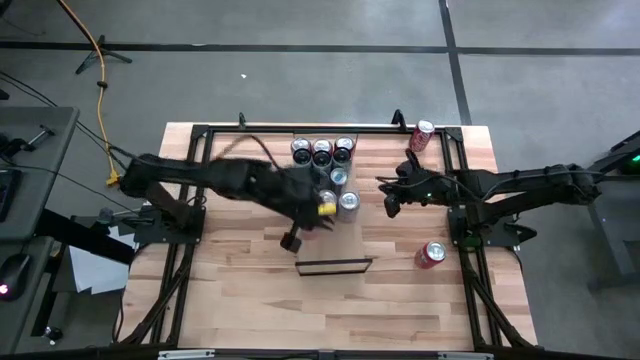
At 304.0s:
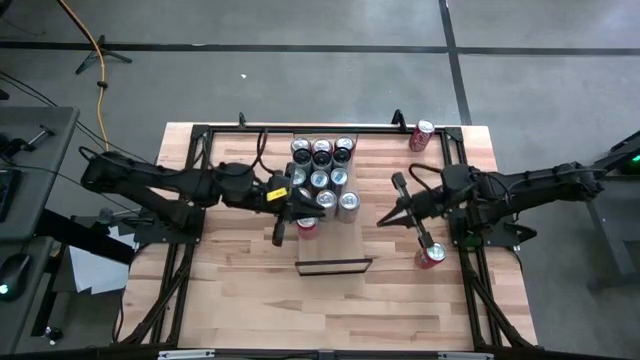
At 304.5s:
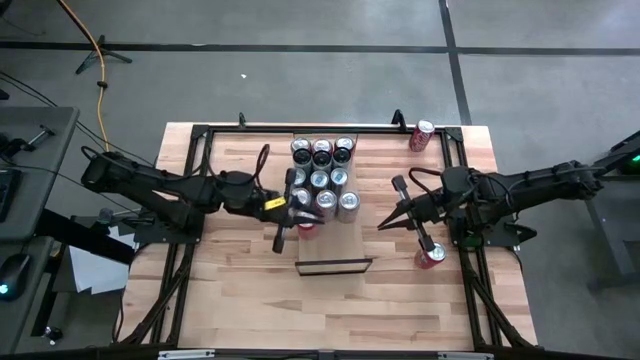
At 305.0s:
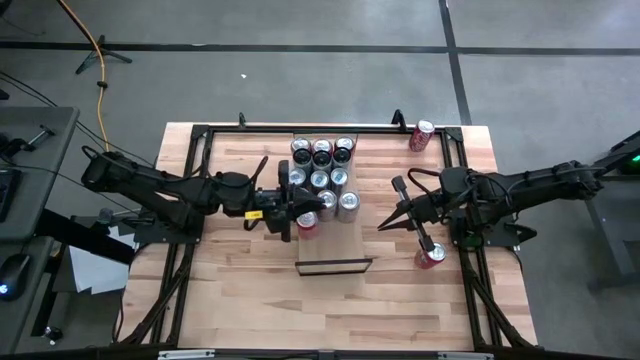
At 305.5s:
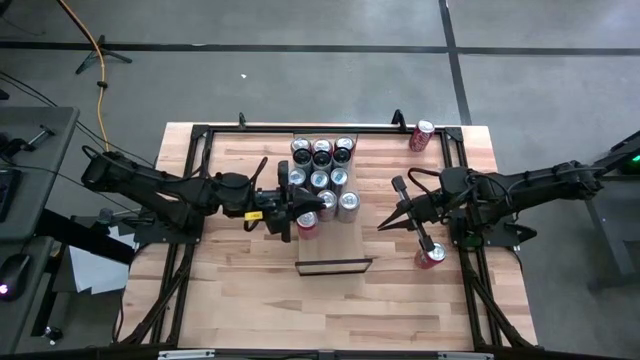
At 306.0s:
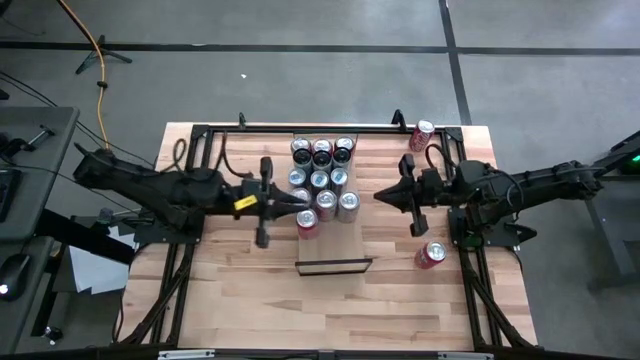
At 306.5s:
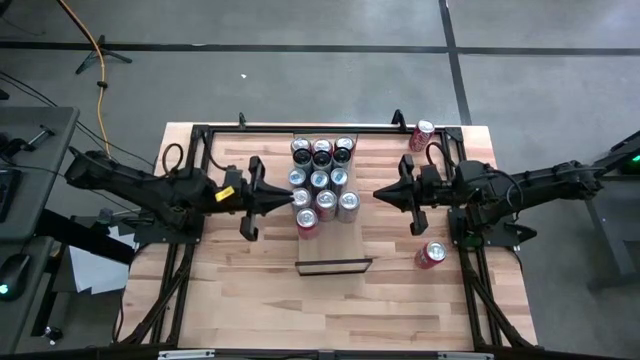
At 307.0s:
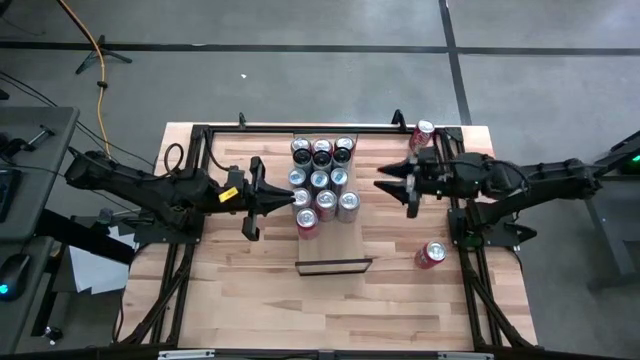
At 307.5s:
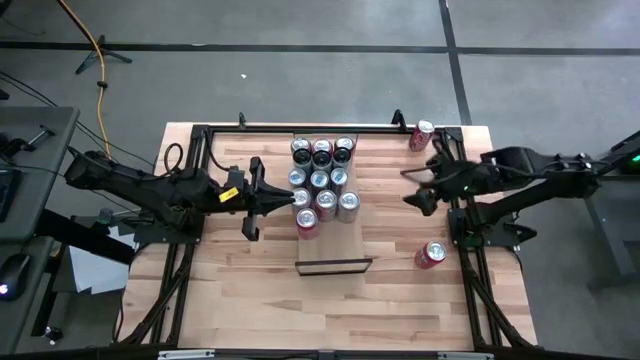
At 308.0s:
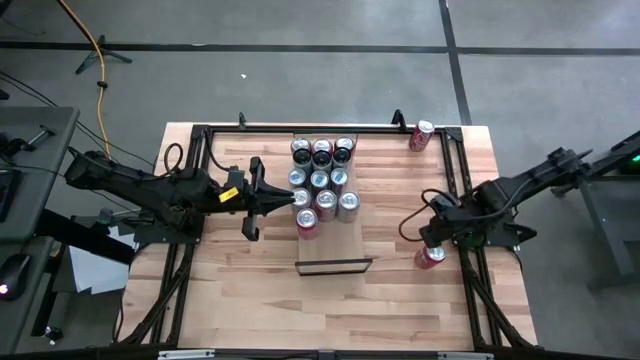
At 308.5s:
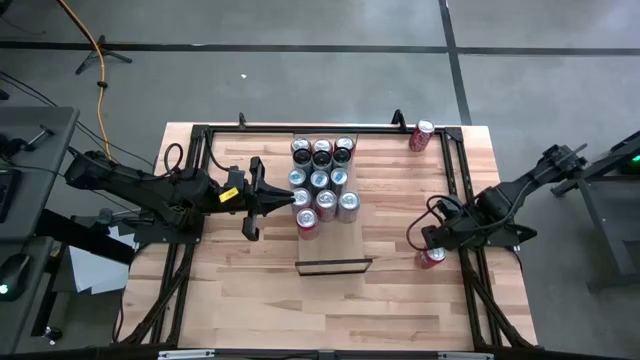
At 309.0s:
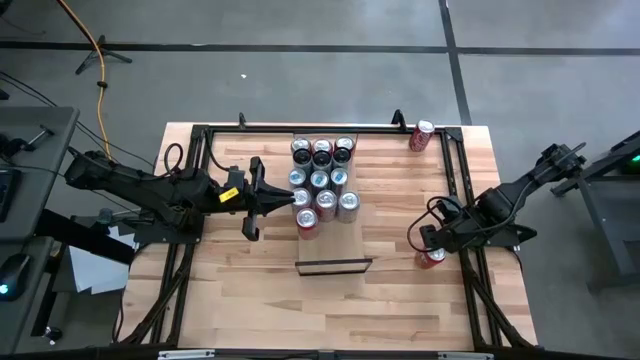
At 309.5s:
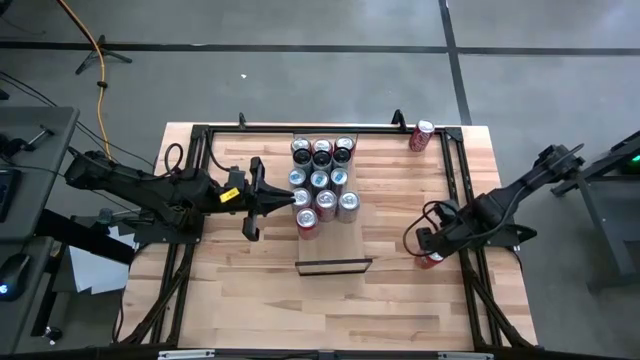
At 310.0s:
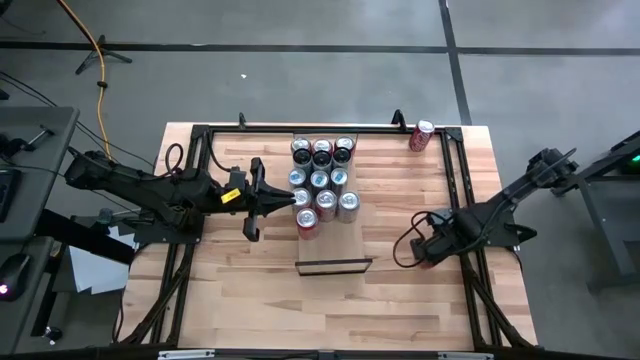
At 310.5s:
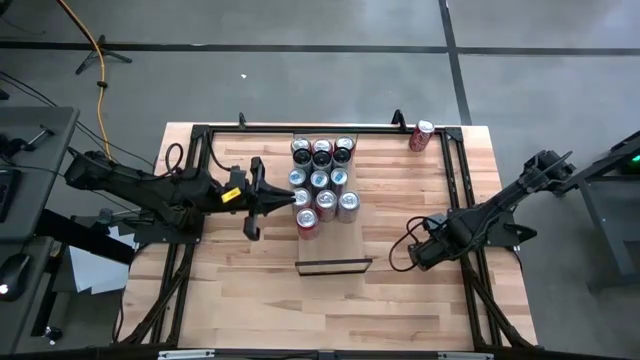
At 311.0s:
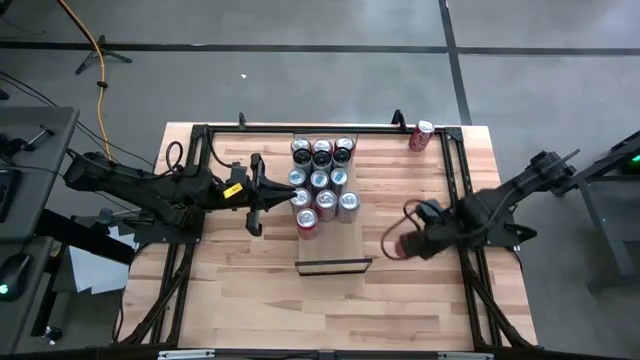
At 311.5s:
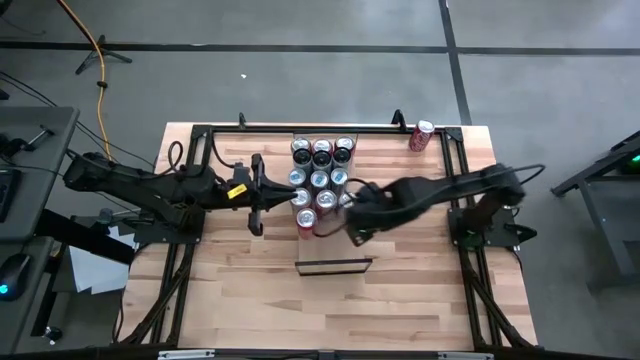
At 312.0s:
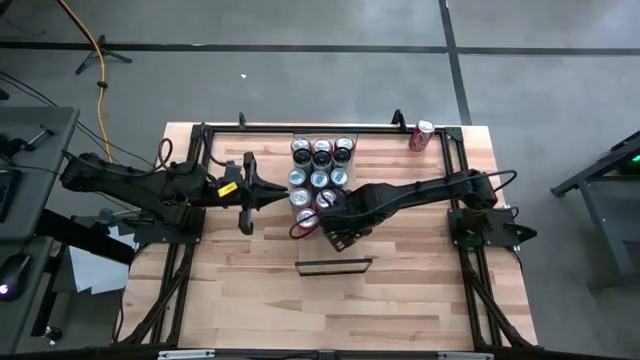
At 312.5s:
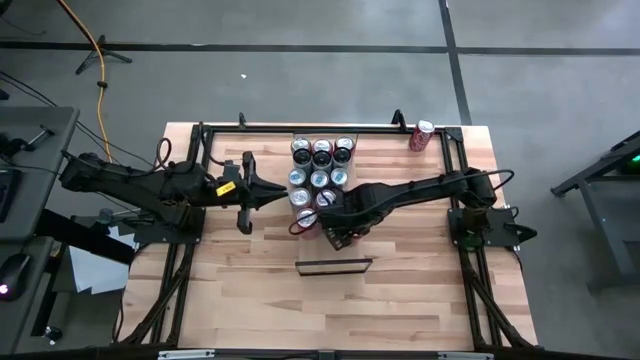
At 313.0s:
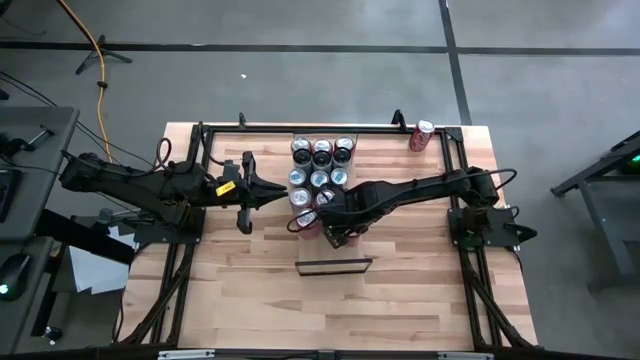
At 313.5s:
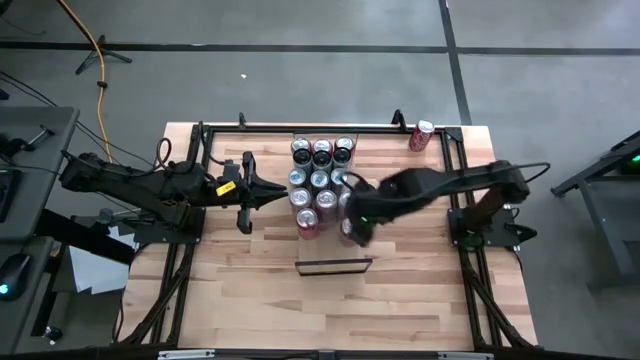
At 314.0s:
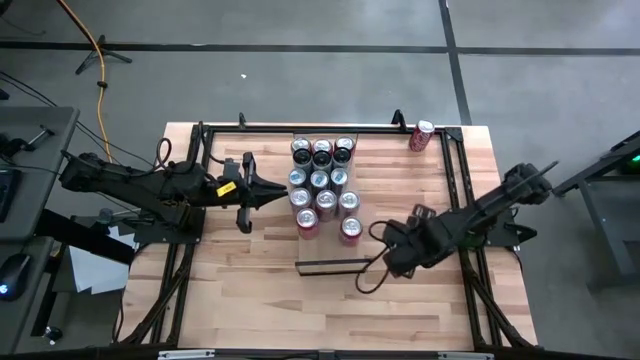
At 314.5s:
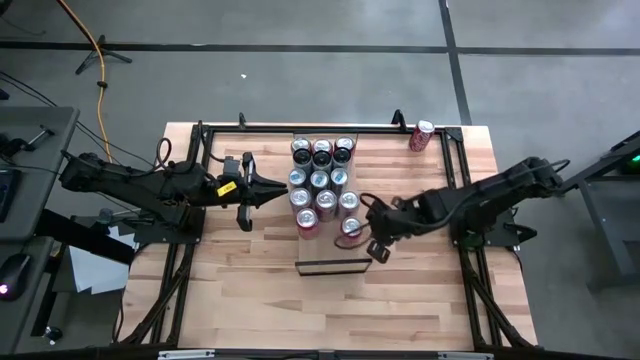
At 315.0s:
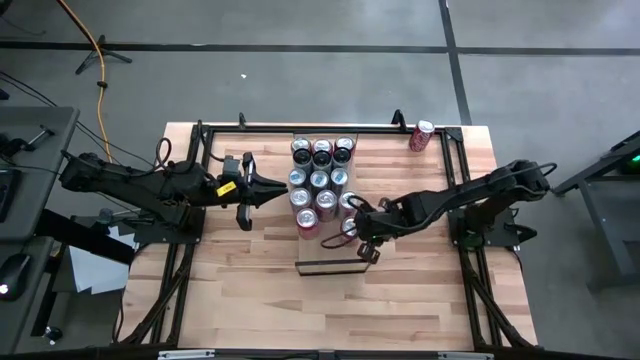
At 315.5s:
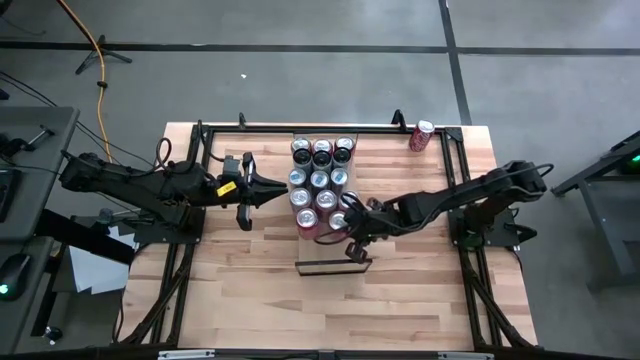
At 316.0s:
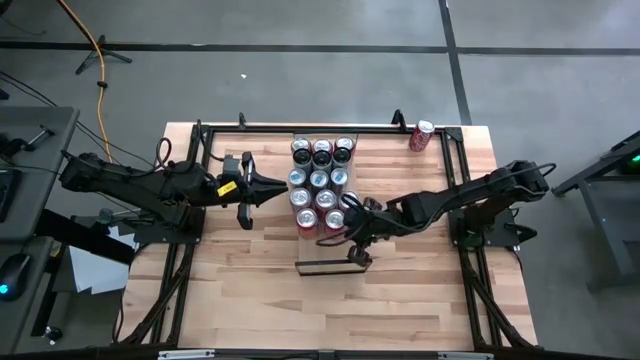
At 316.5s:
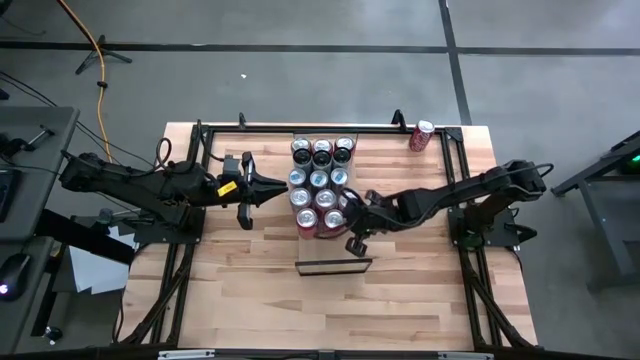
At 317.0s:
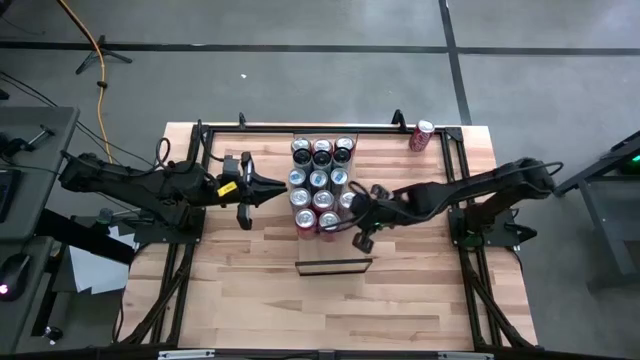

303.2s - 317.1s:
Task: Place canned beverage on shelf
Put the red soda can on the shelf aligned with the other orange soda can

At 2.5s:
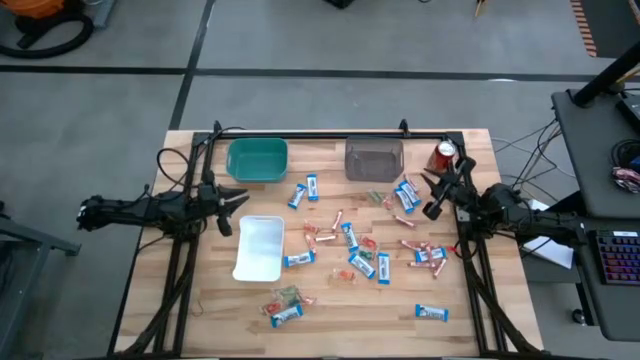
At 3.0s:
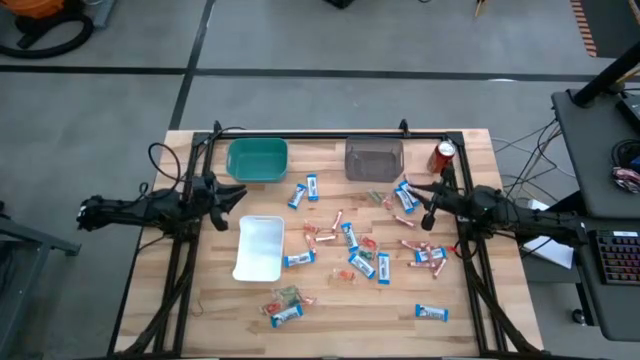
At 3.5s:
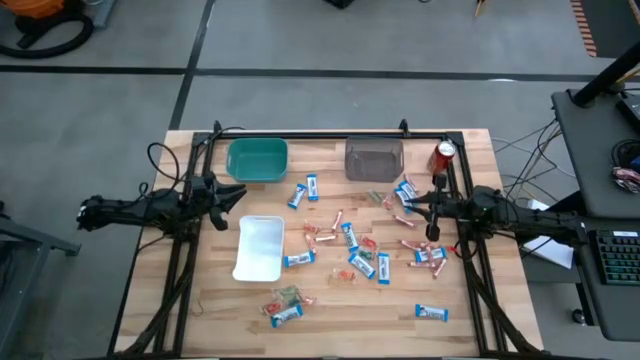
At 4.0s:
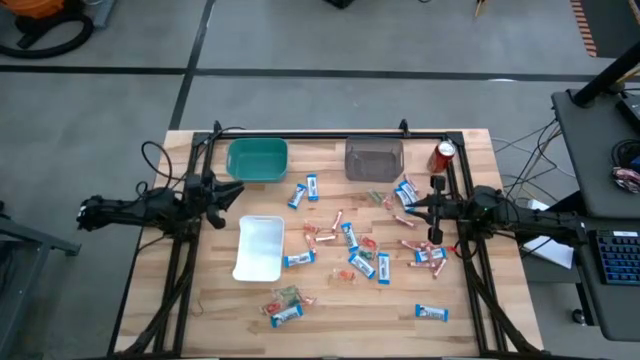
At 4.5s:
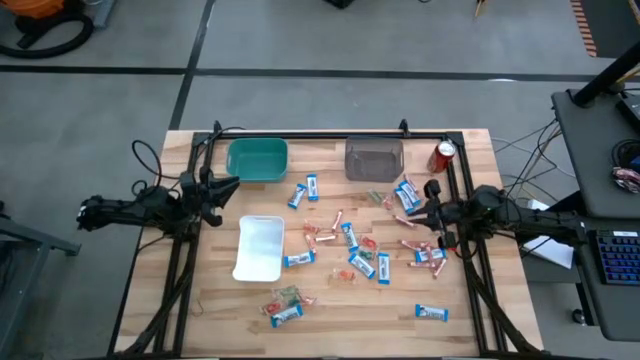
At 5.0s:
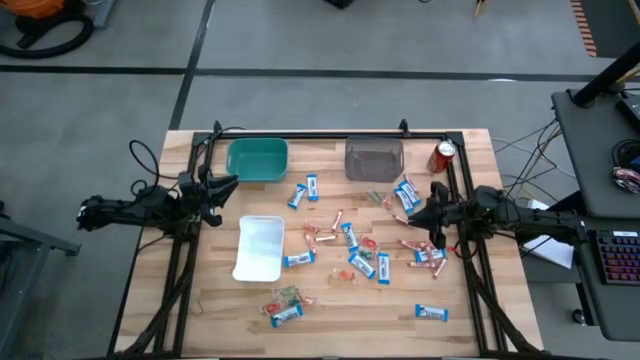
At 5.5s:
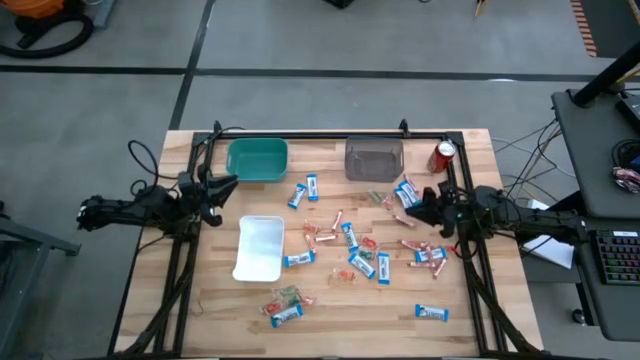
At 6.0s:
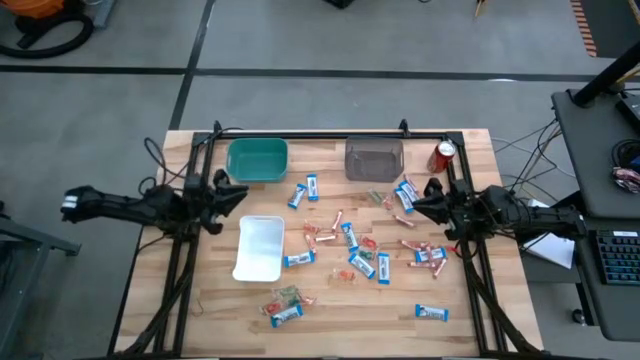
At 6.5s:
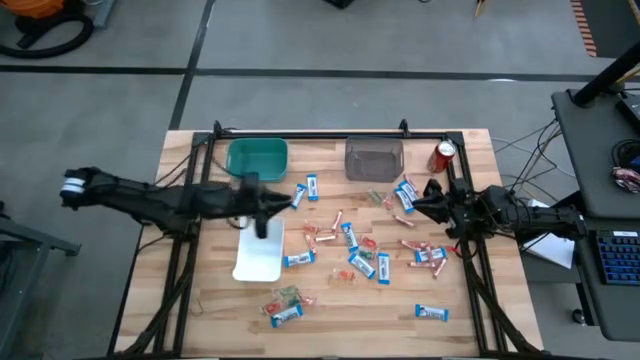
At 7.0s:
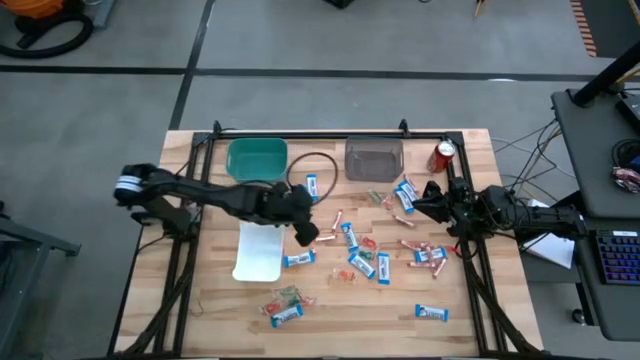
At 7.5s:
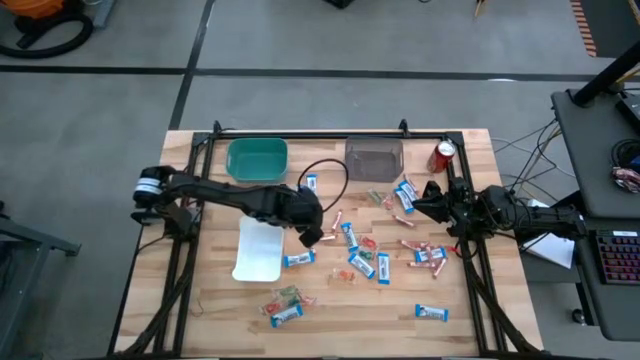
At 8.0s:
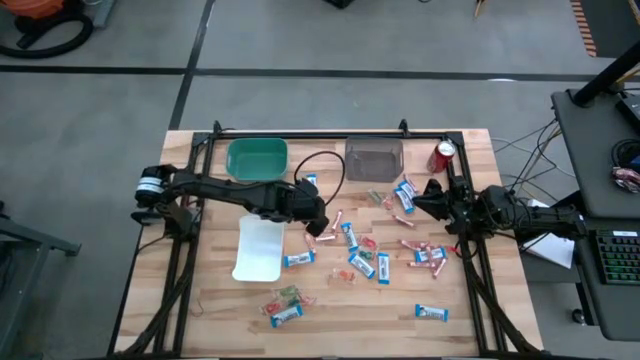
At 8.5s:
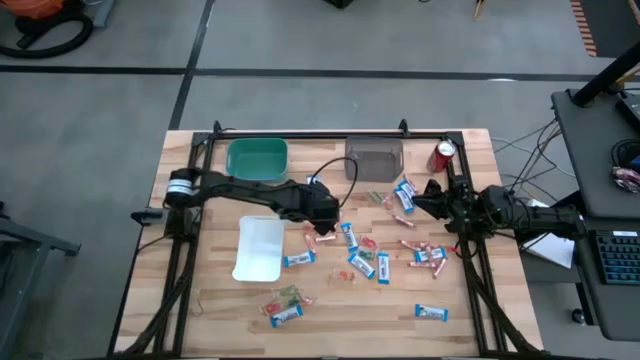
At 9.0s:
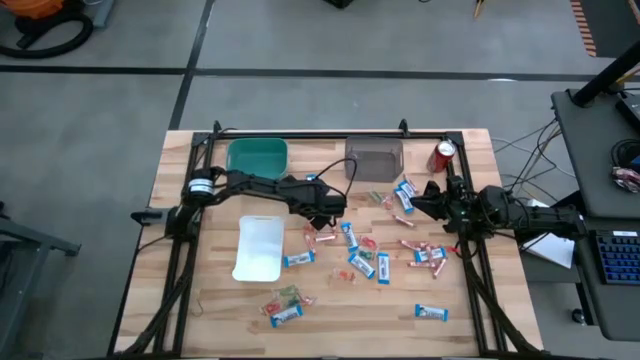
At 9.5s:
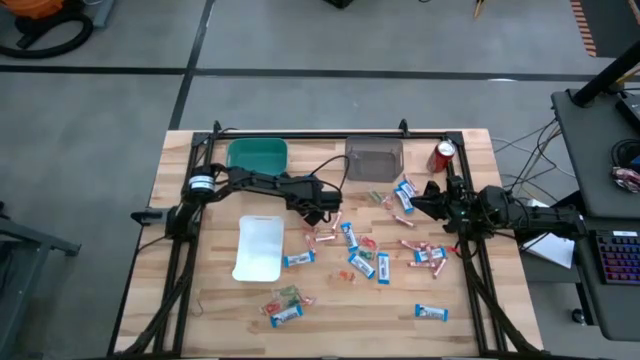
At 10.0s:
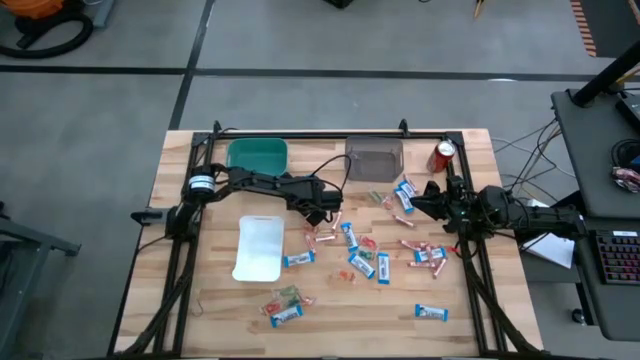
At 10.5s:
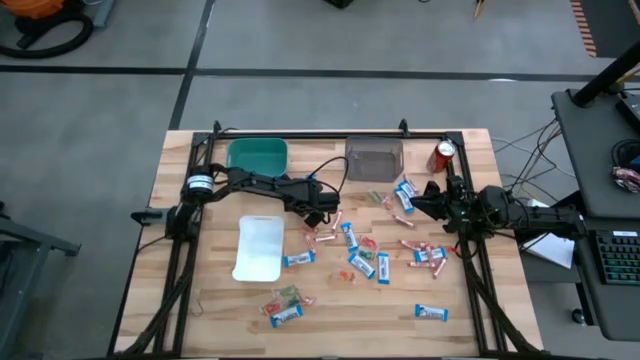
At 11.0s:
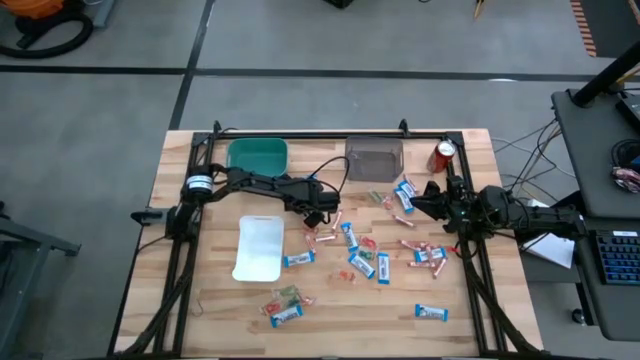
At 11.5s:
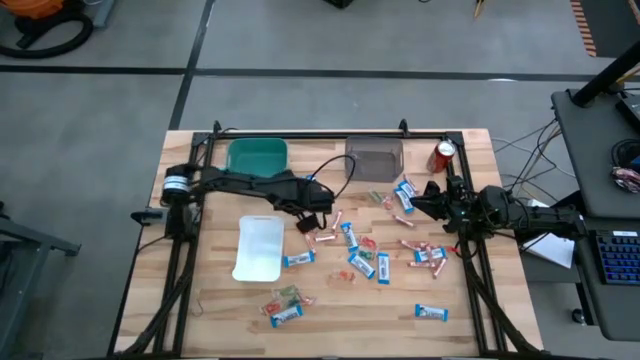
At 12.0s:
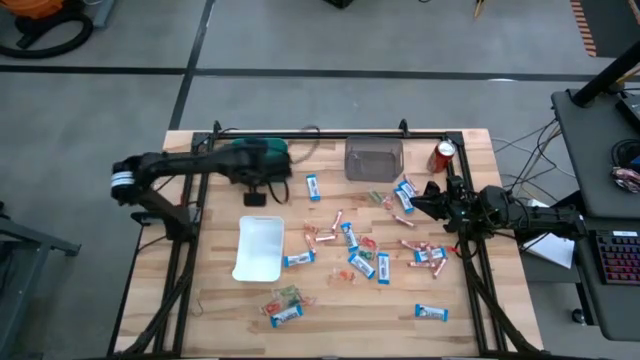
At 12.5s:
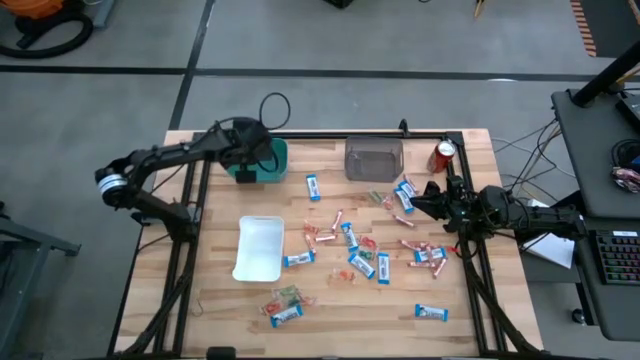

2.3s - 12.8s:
Task: Sort candy
Put the white chocolate bar into the green bin
